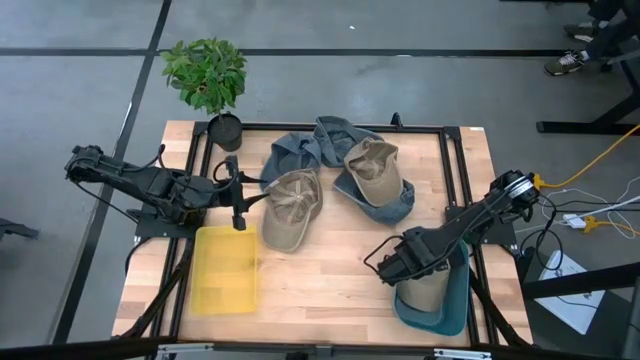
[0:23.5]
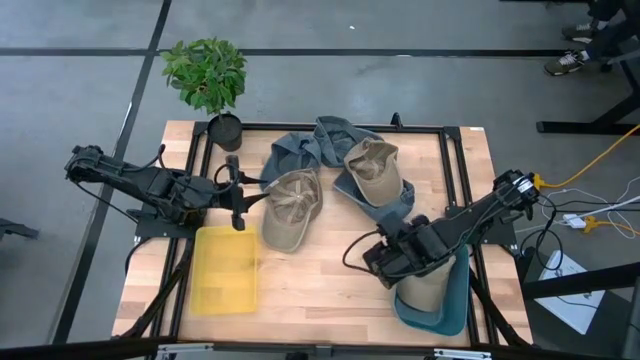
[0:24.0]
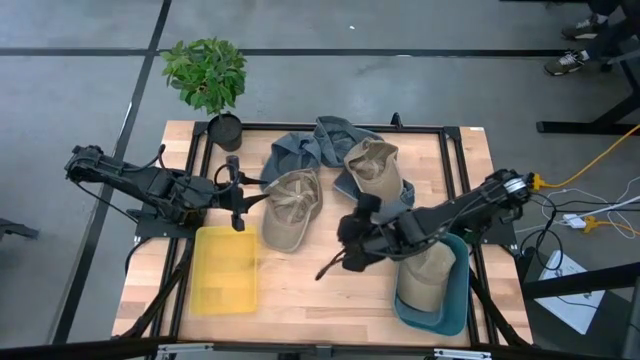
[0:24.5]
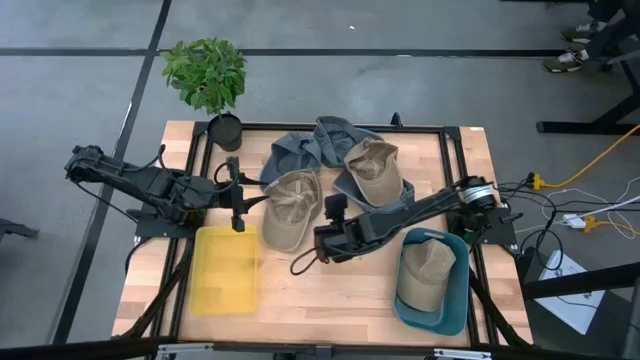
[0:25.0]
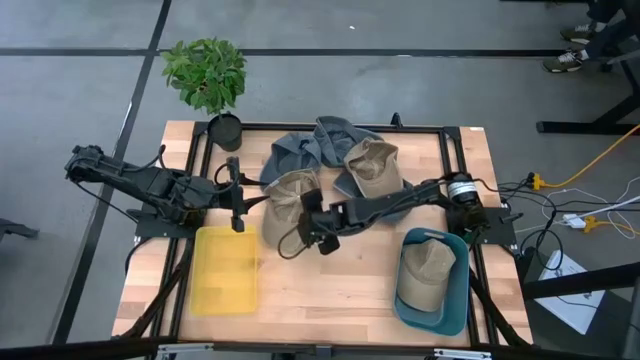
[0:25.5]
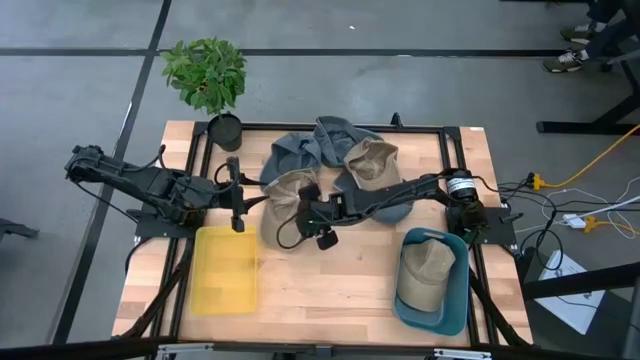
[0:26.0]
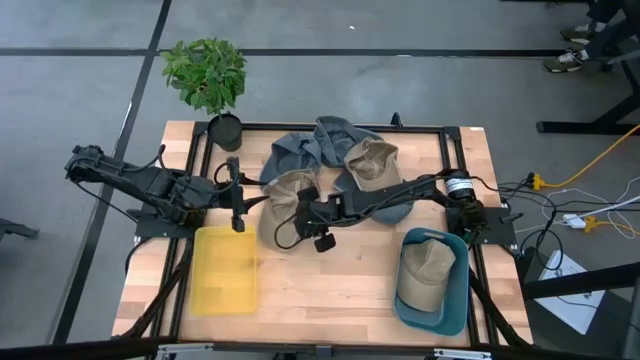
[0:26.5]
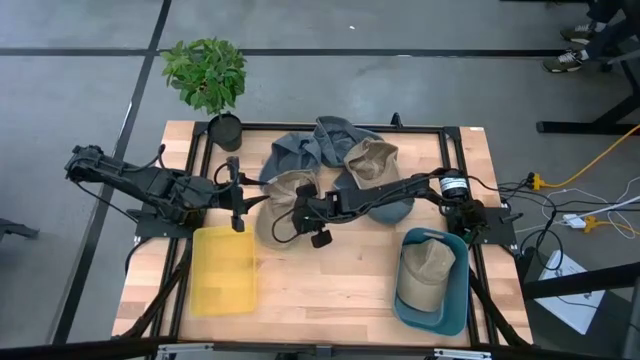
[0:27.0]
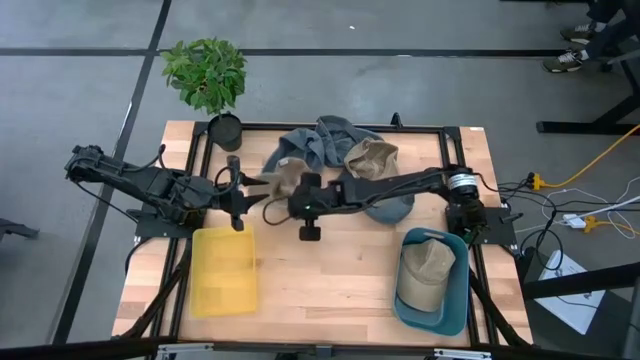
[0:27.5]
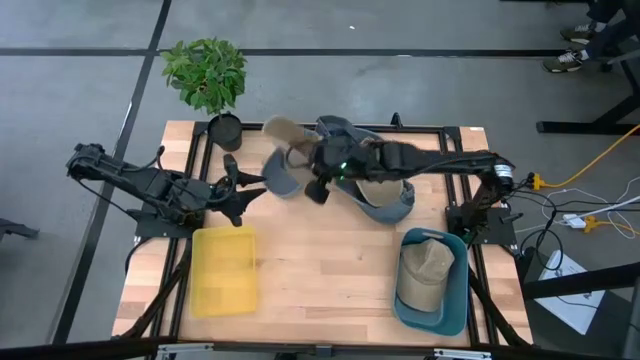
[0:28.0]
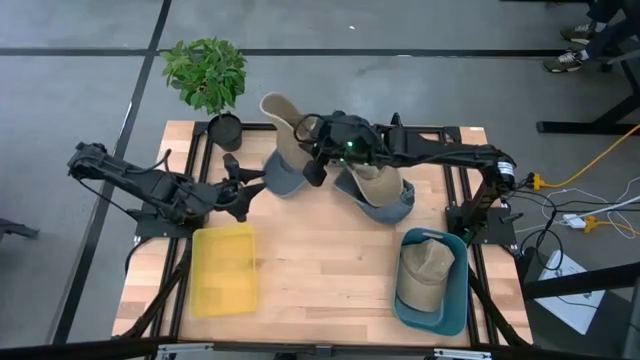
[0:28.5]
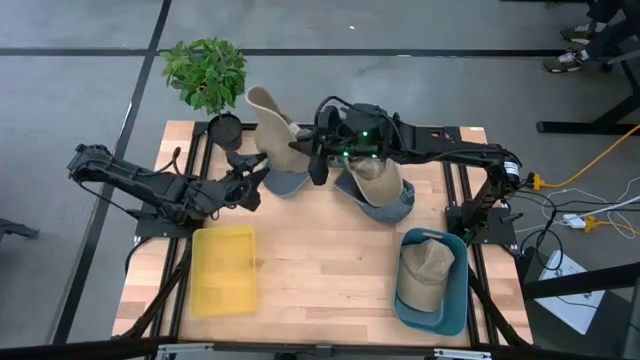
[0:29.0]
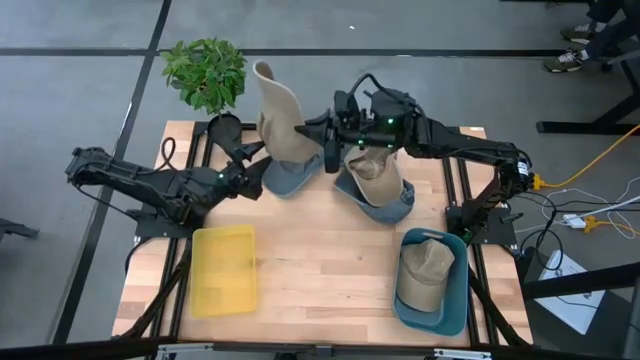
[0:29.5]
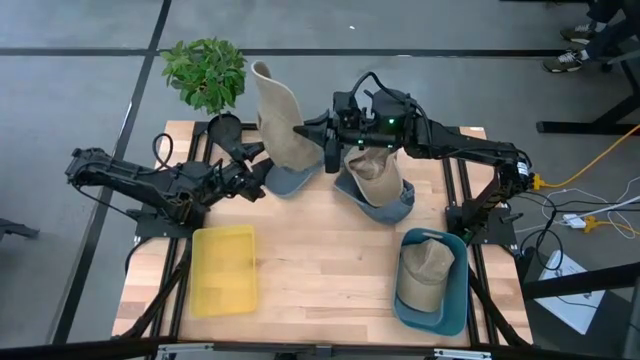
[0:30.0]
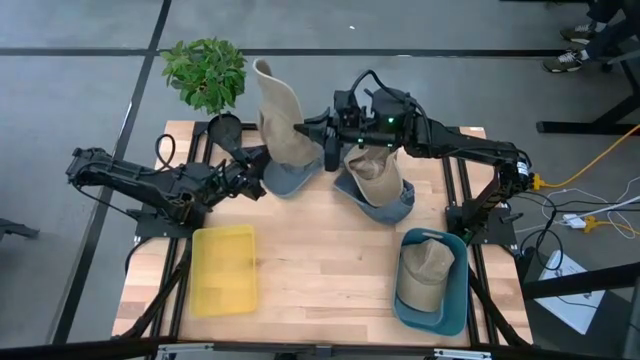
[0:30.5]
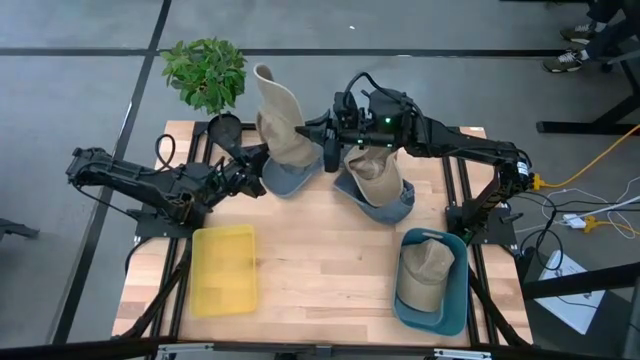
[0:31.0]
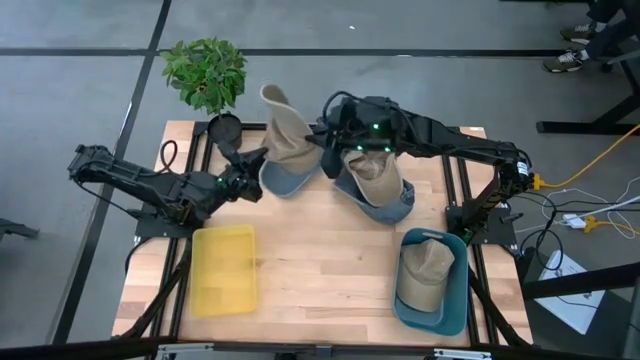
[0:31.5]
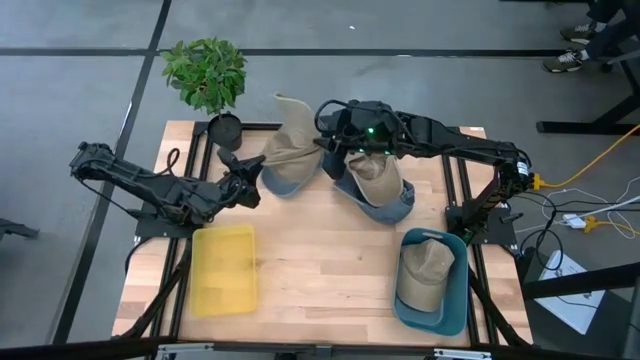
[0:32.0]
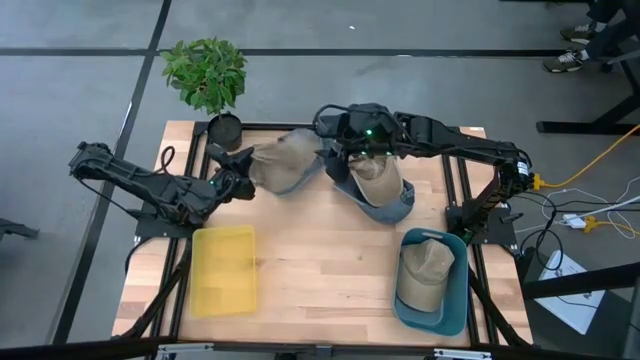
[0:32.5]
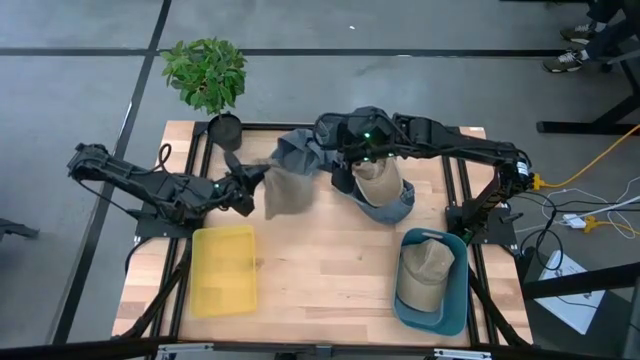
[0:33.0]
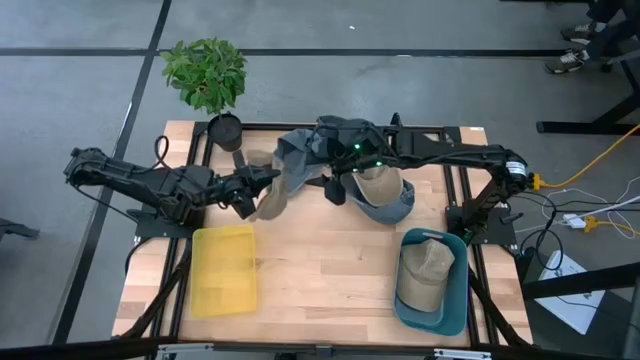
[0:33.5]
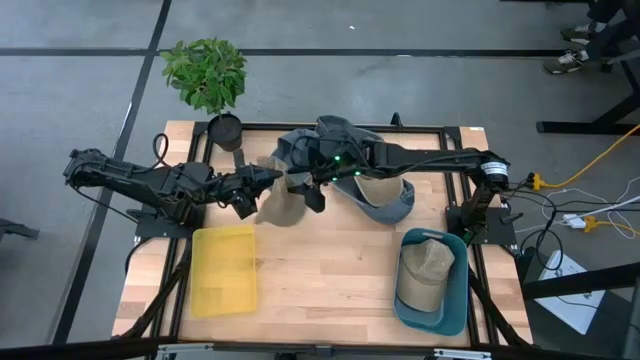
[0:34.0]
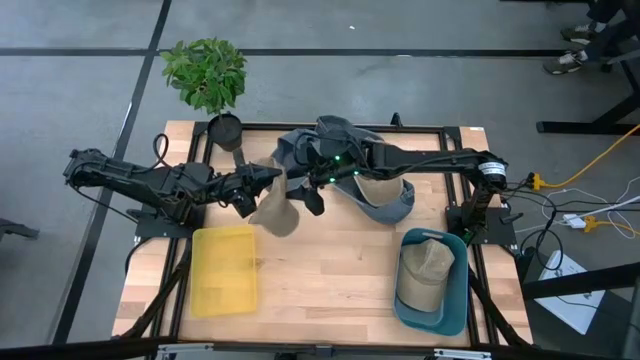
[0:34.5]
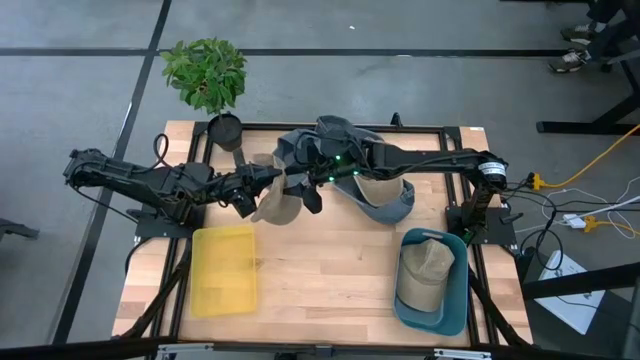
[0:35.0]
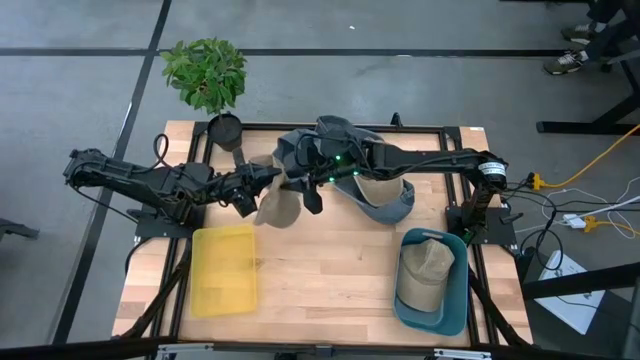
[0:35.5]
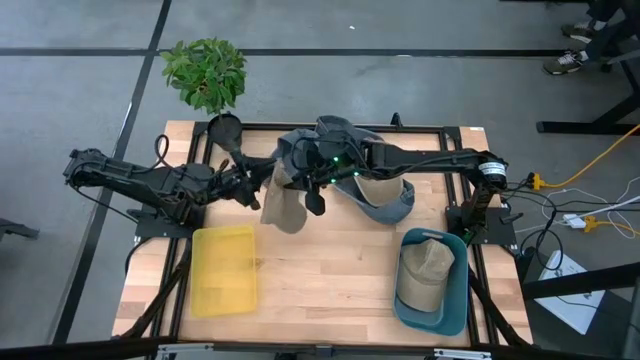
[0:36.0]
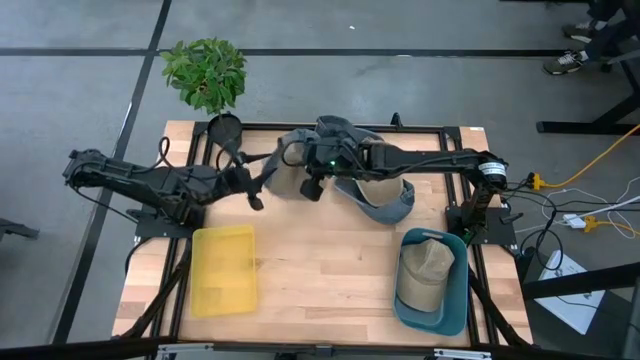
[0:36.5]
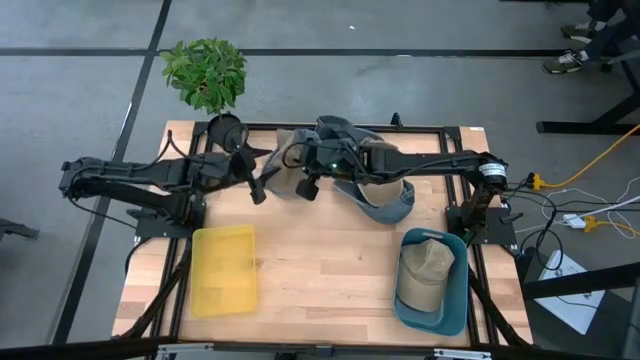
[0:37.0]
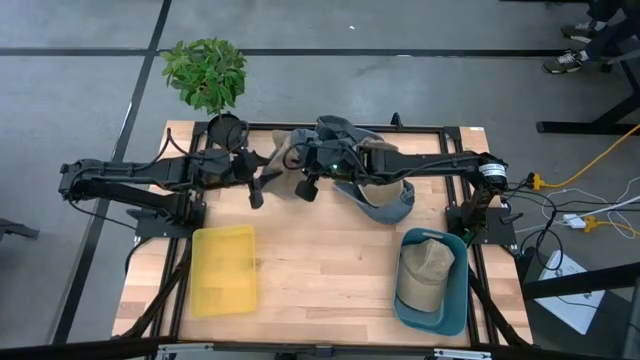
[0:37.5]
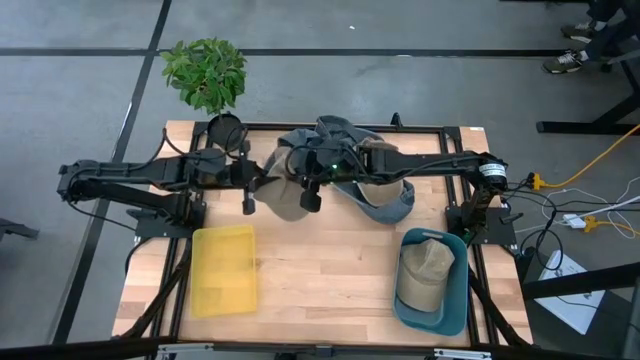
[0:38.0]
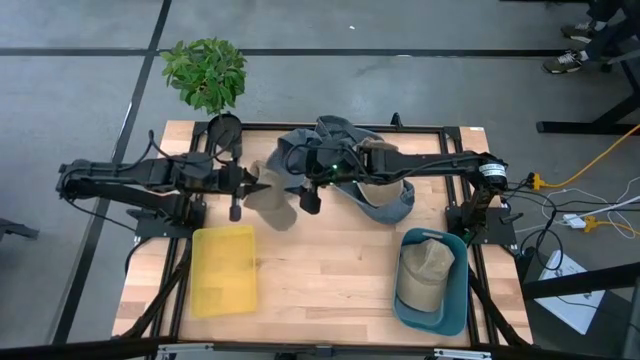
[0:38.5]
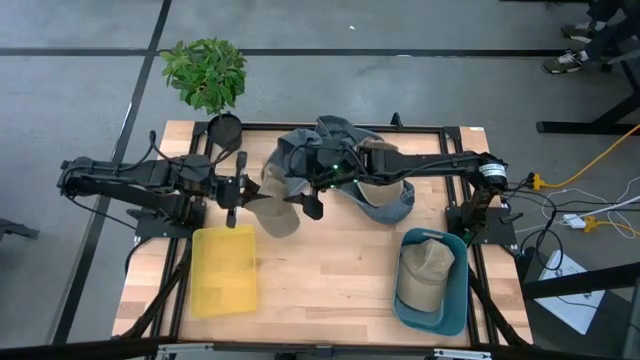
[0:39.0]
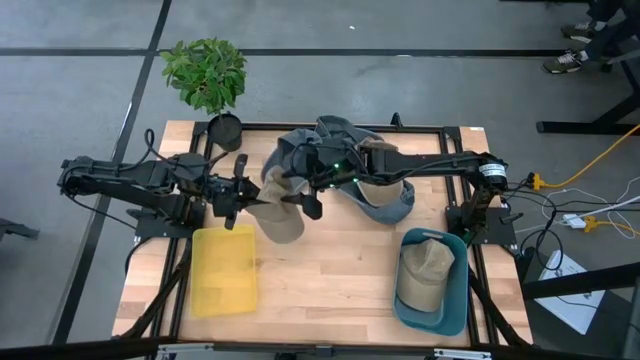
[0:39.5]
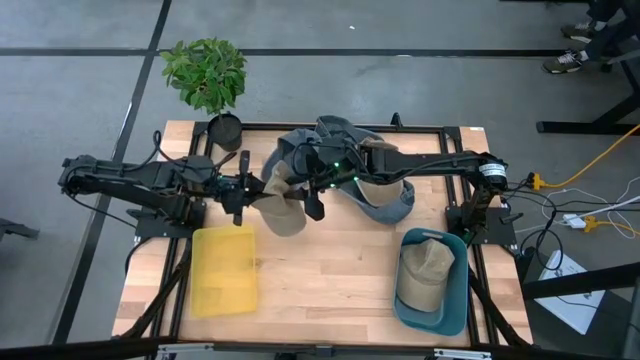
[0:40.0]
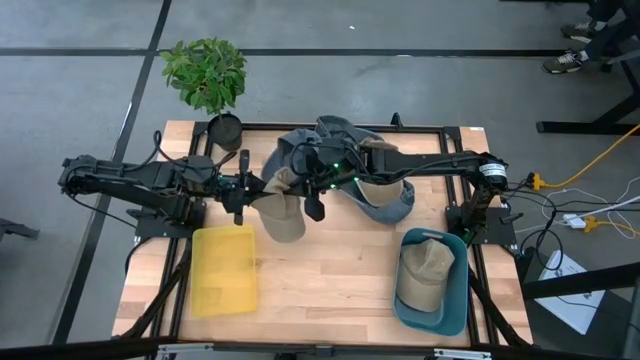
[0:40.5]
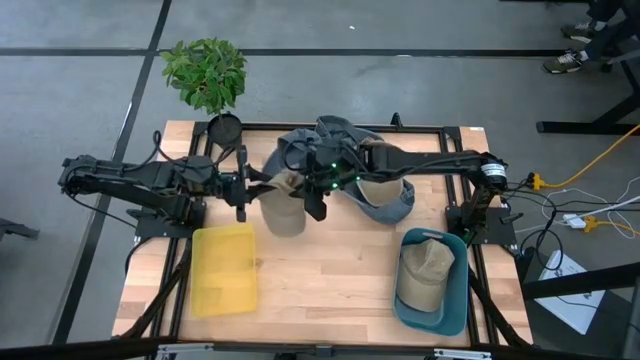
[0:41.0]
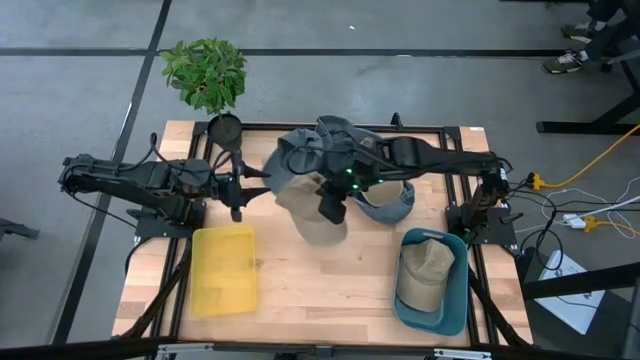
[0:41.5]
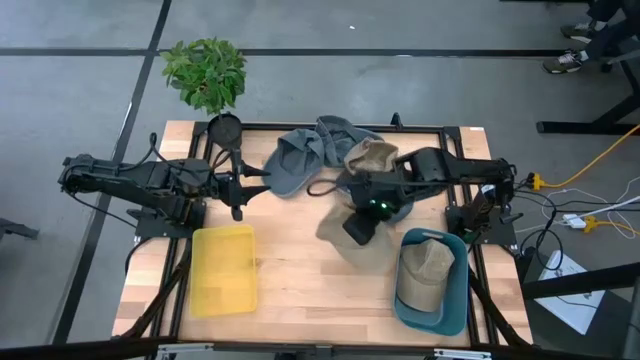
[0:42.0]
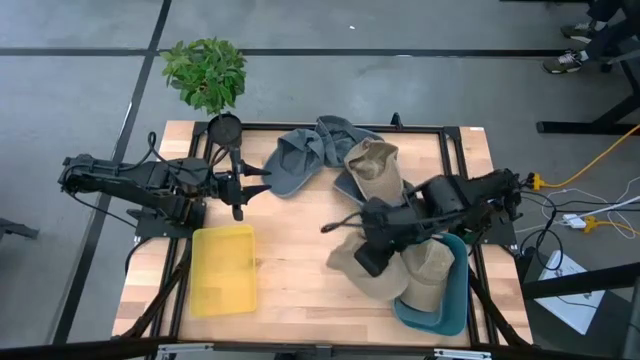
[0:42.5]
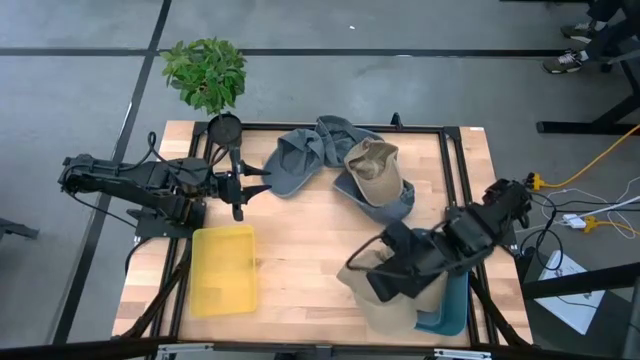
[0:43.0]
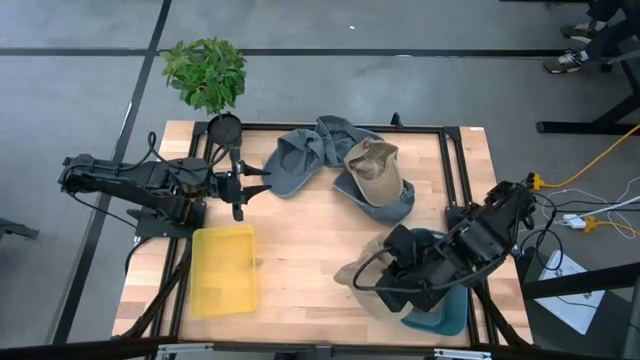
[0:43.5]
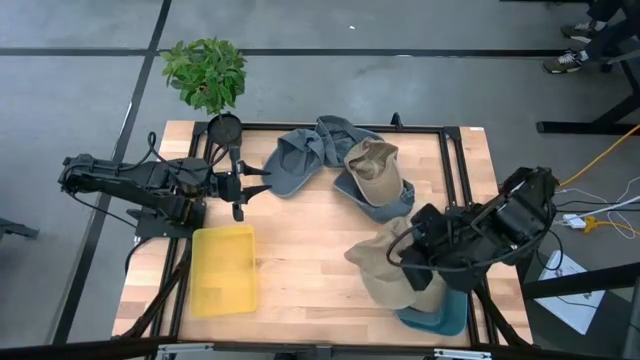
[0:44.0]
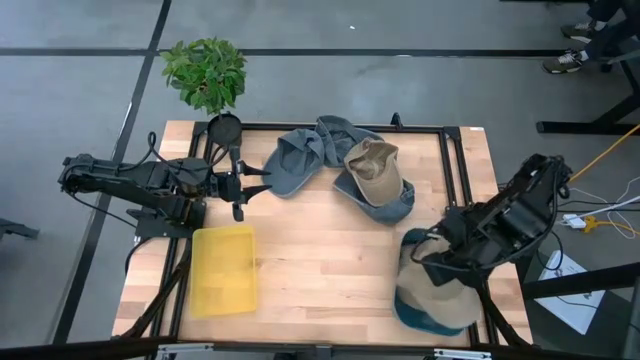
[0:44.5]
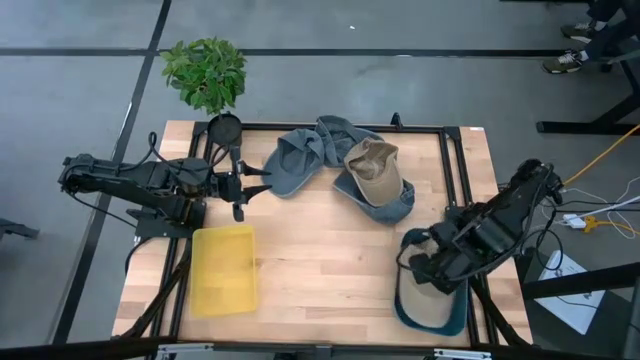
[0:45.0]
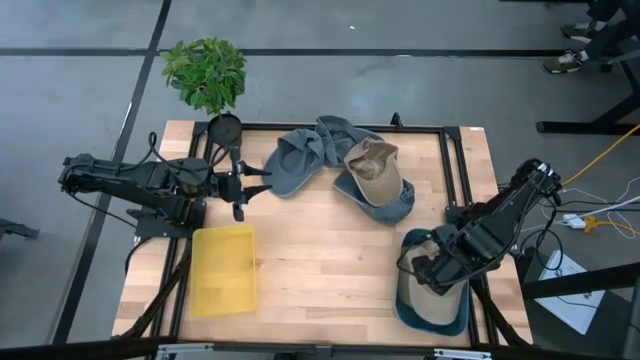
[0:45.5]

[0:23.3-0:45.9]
Task: Pick & Place hat
Put the left brown cap into the blue bin
